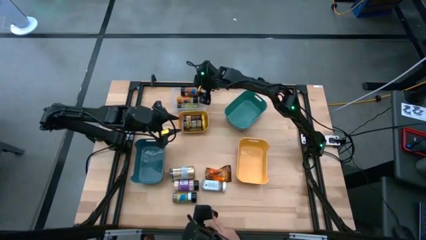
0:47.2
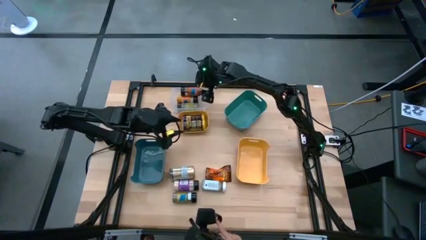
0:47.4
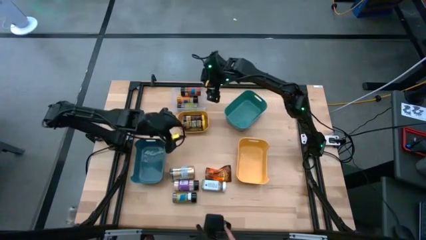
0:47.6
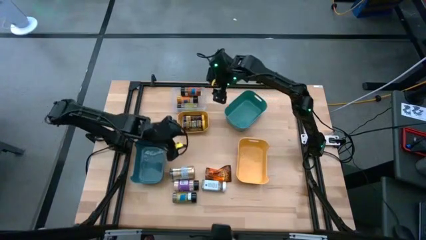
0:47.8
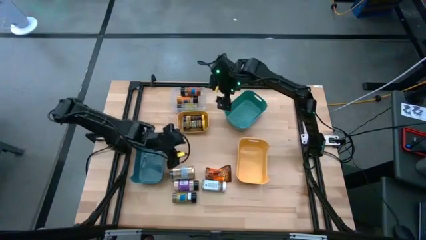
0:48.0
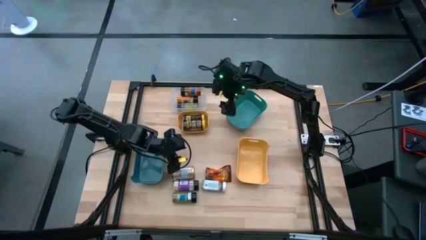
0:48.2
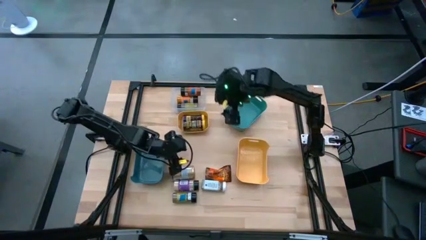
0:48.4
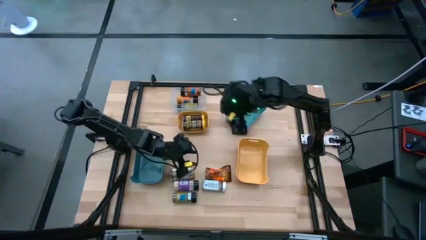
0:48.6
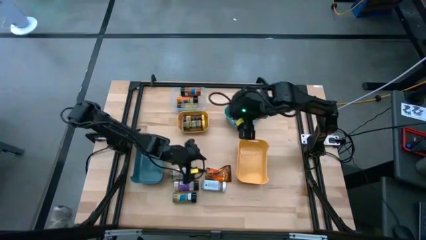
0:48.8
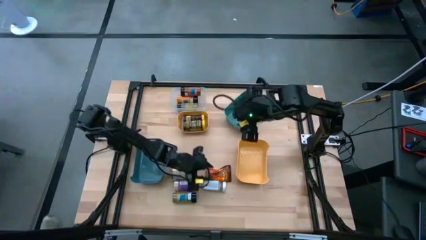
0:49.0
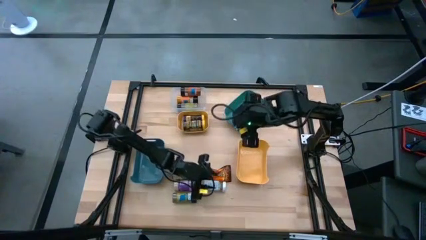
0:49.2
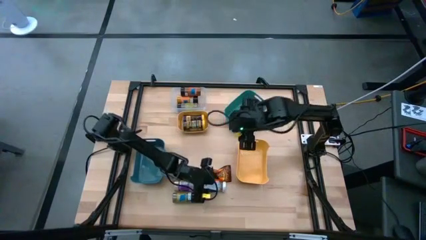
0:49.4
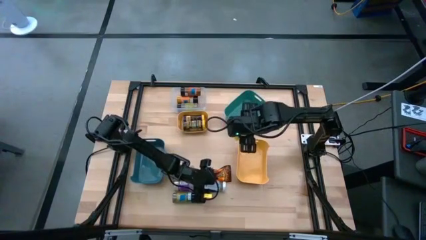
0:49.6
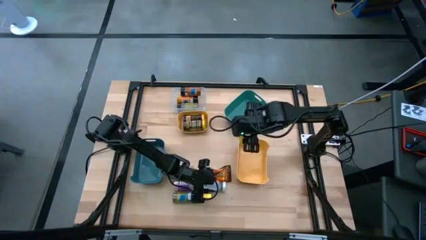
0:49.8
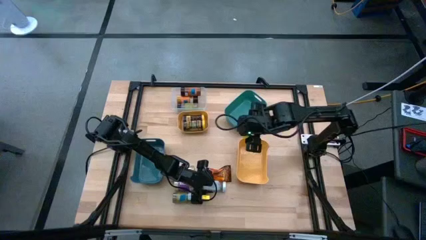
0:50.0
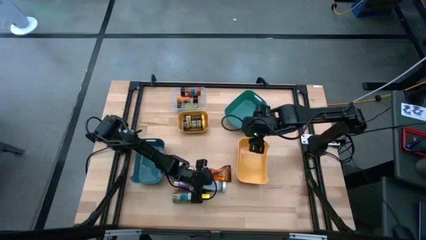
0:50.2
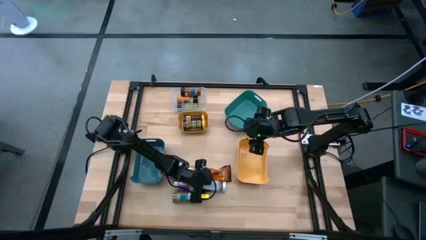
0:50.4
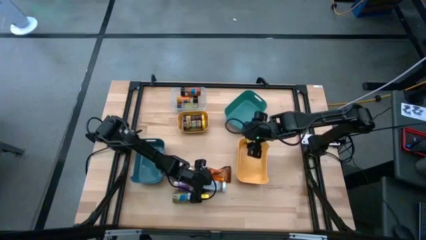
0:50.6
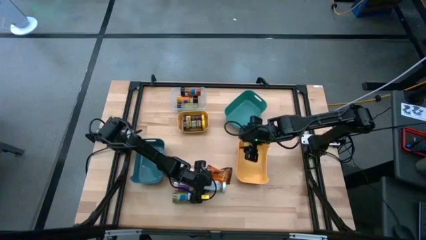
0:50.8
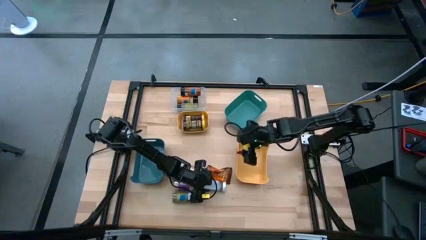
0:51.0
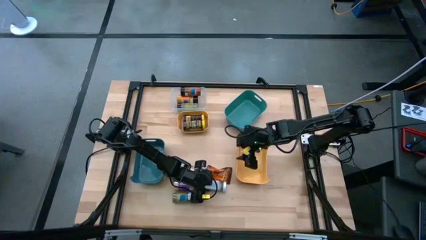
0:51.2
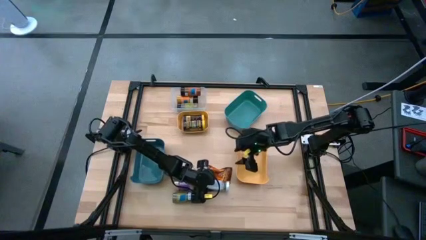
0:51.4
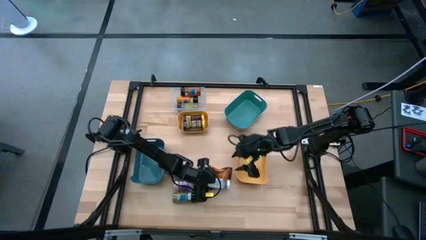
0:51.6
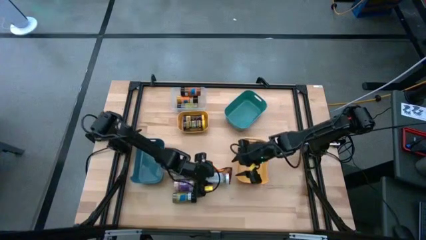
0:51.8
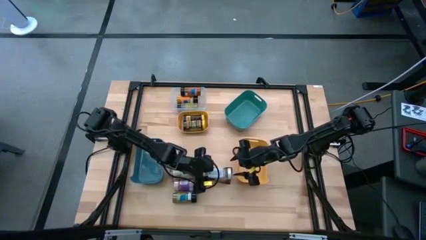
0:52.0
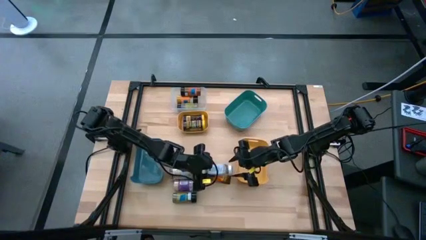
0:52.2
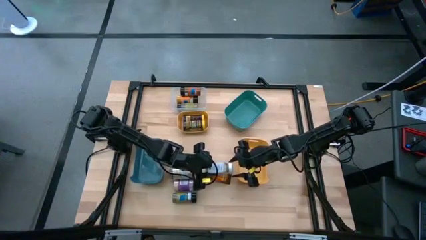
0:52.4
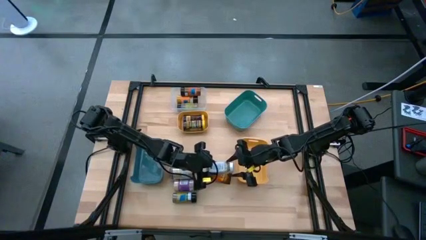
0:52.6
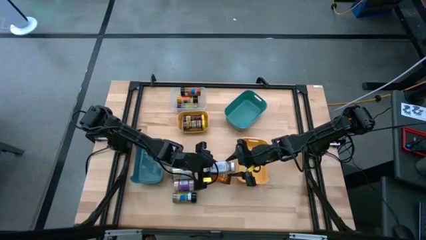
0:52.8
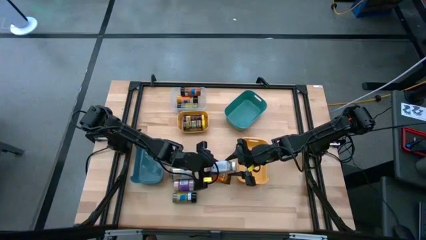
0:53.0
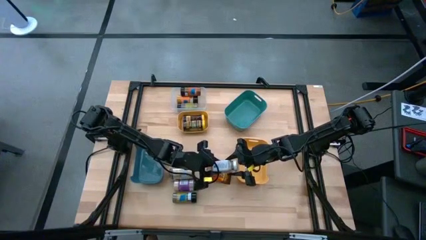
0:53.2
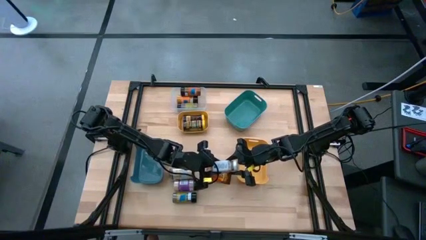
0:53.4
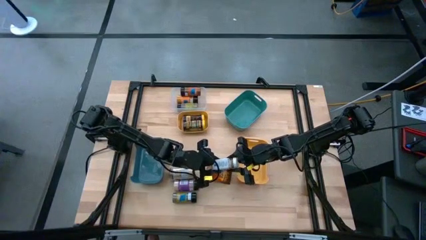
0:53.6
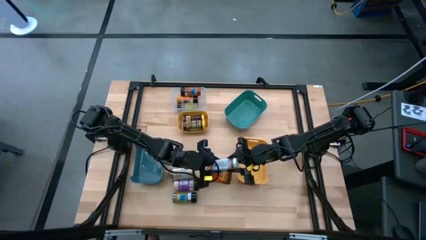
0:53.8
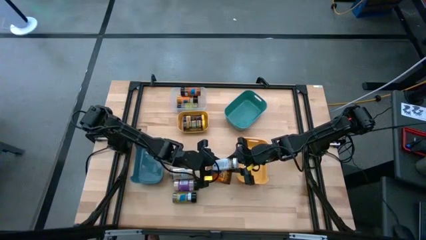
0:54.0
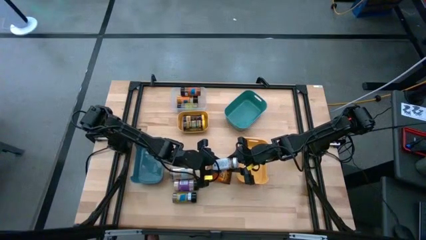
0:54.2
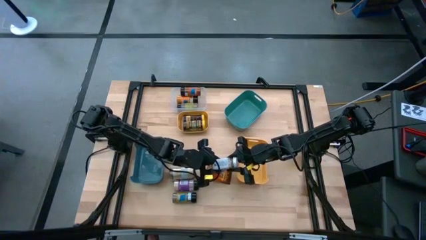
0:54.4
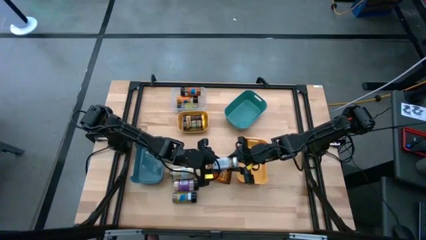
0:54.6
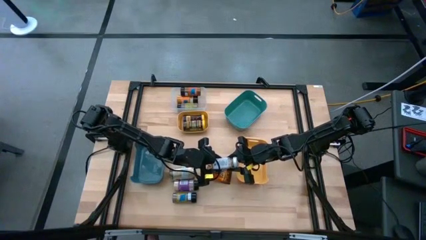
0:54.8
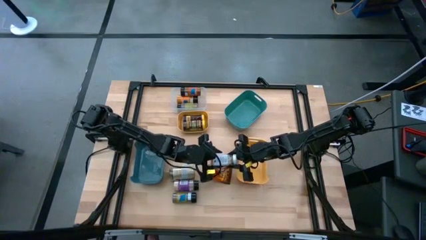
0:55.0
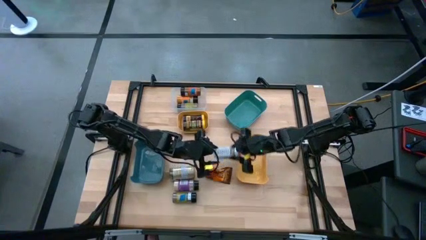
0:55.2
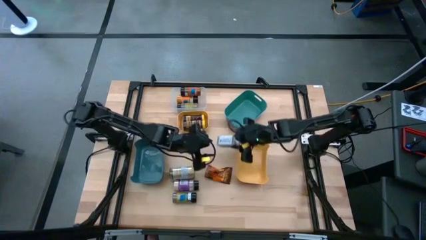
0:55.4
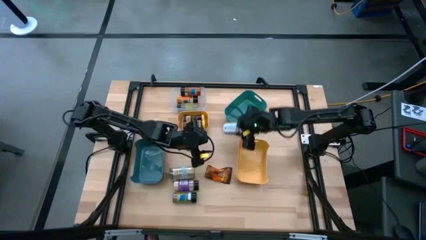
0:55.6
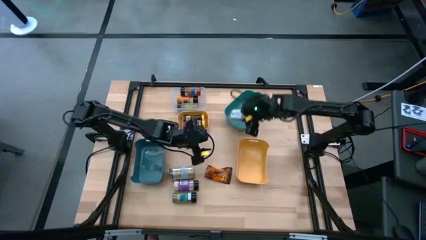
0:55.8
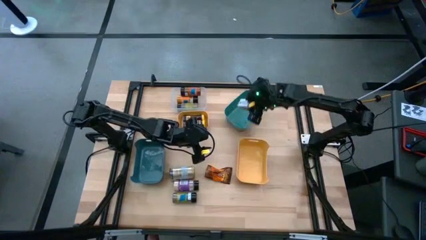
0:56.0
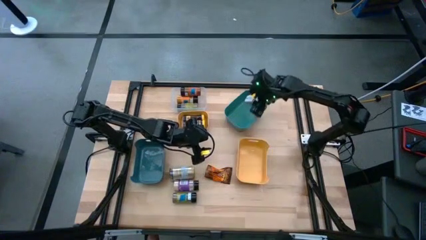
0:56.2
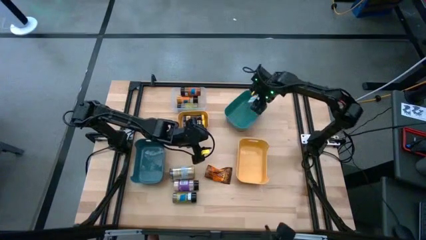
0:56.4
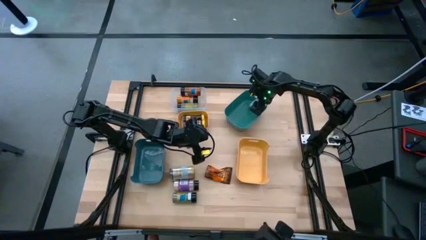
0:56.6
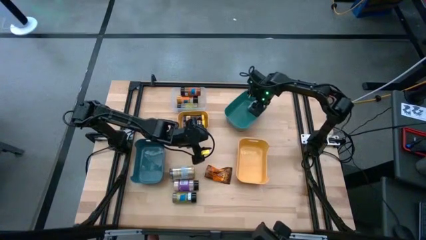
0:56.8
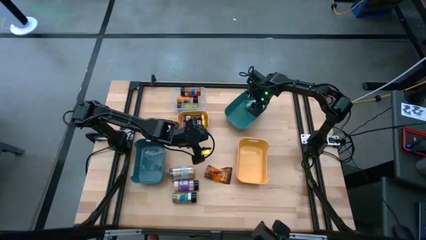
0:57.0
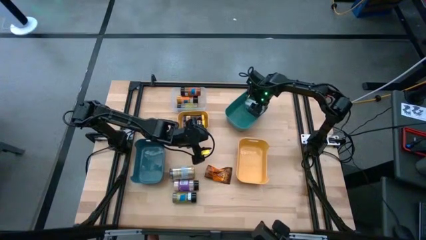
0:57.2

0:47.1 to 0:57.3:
Task: Sort spices by type
Put the white seasoning bottle into the green bin

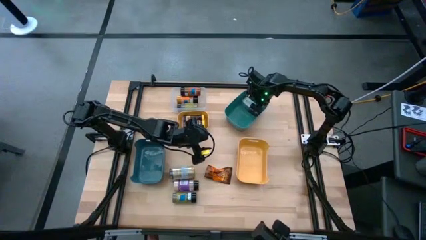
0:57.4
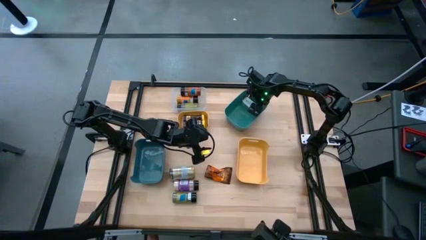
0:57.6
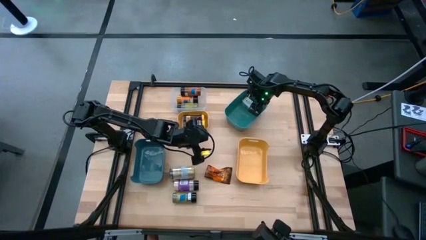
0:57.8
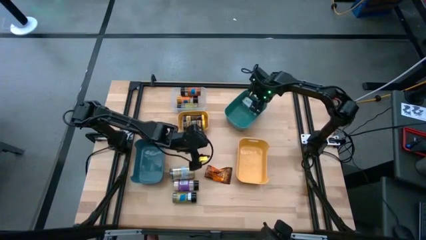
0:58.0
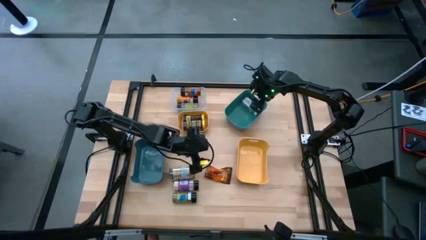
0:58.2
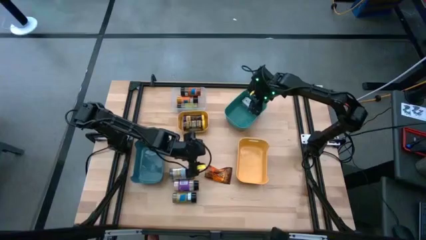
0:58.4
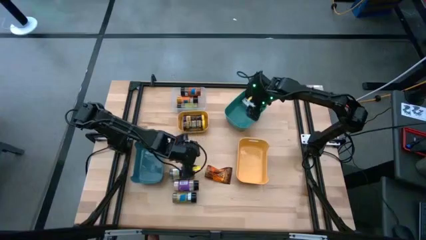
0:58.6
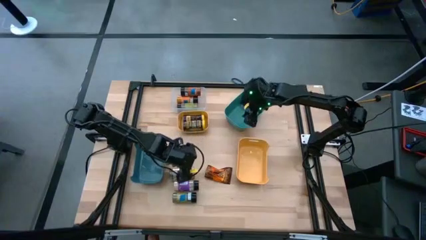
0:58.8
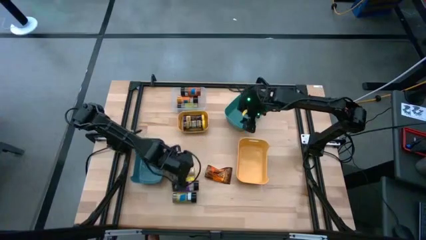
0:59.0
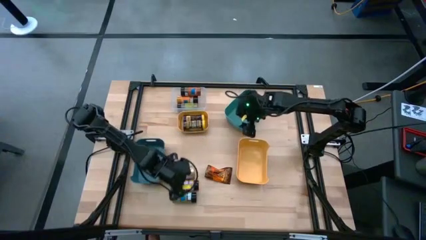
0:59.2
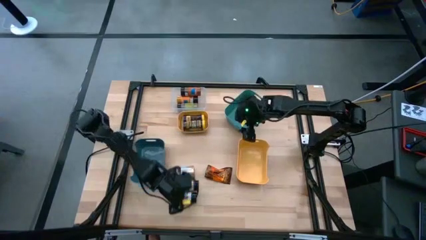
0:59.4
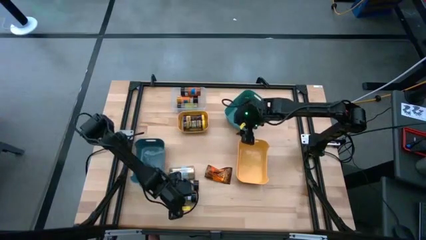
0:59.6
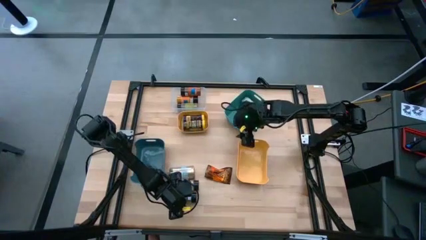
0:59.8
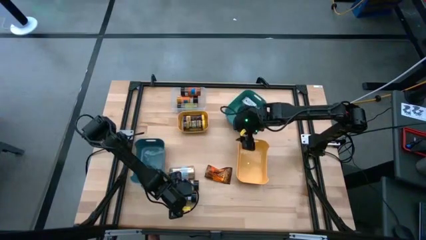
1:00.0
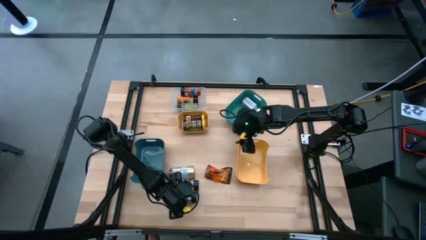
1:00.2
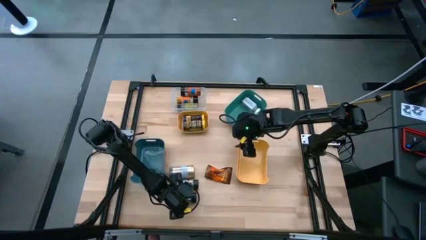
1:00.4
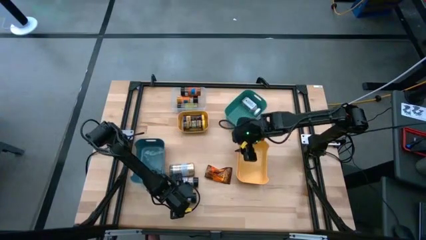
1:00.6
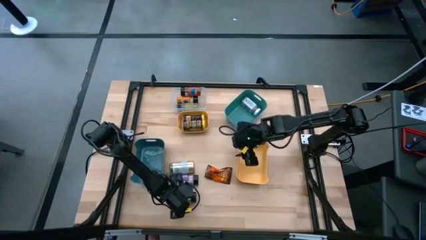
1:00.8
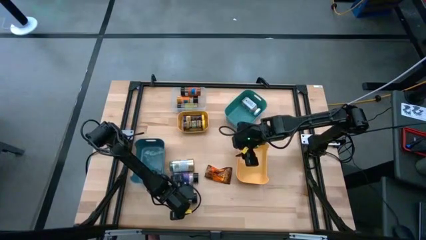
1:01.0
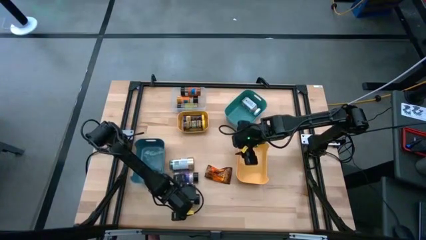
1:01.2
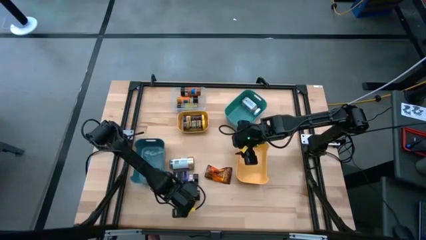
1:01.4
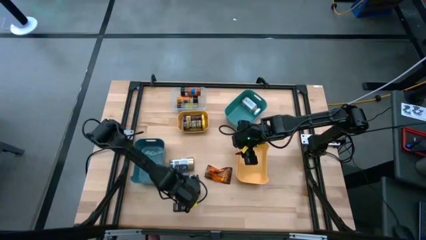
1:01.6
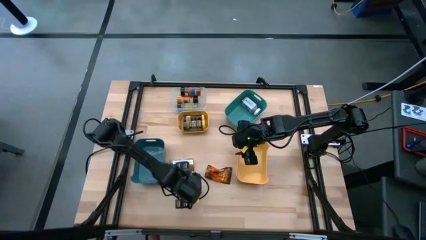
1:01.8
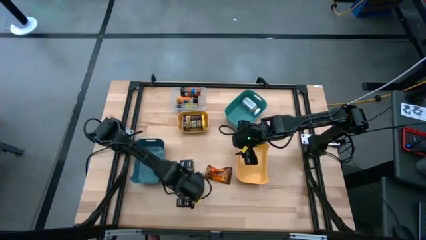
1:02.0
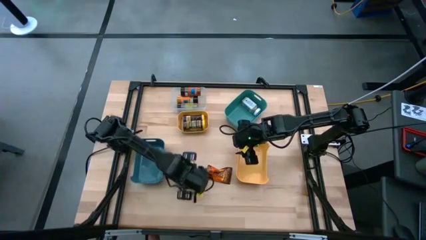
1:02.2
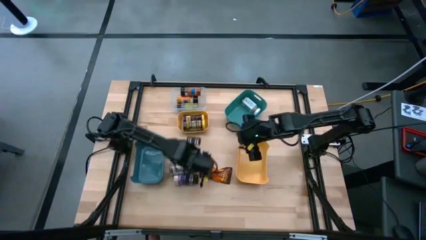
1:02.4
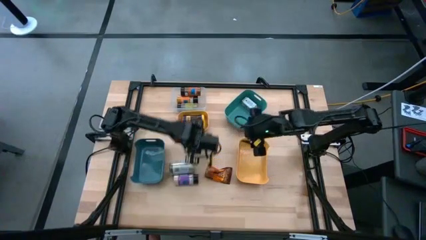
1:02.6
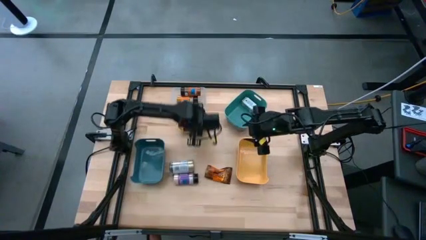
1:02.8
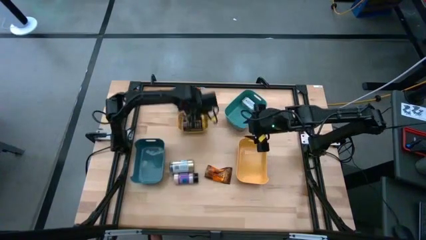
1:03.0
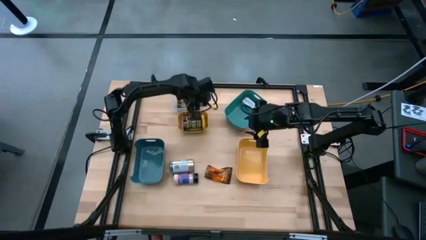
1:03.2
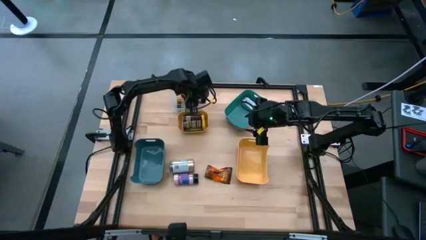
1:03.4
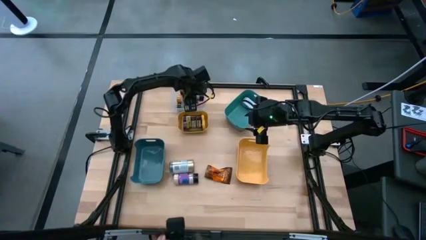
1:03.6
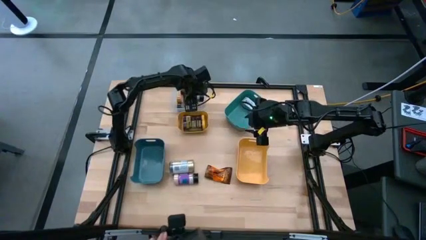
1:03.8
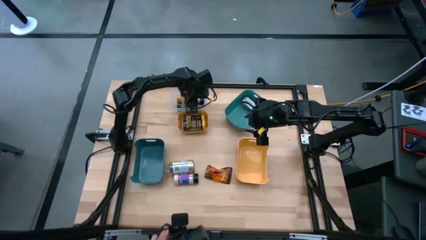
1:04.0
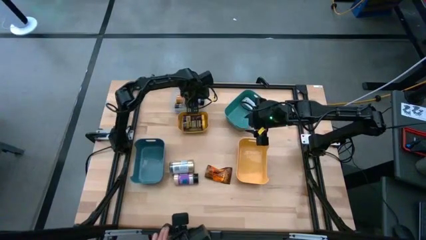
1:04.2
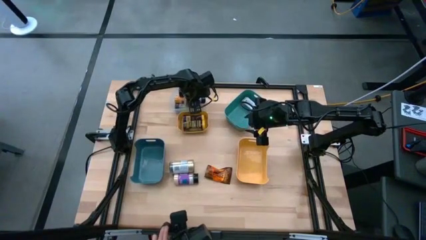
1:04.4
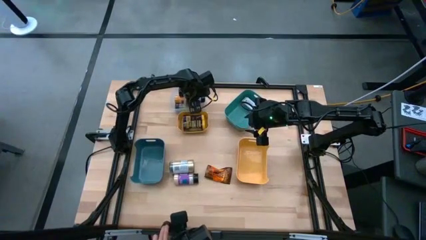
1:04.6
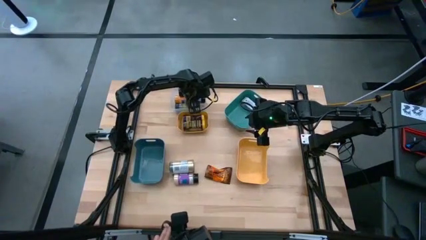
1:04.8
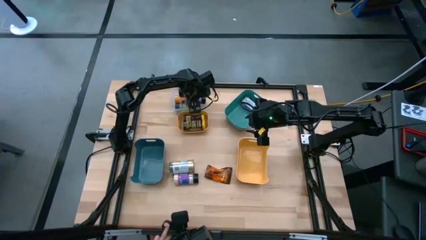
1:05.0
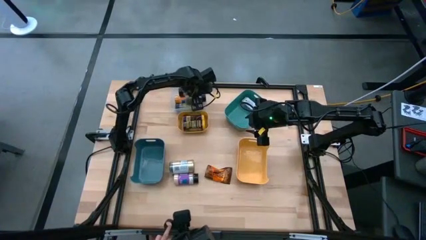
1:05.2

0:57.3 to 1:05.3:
Put the black seasoning bottle into the transparent bin
